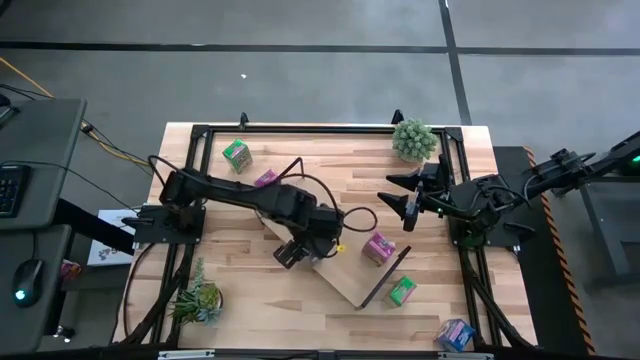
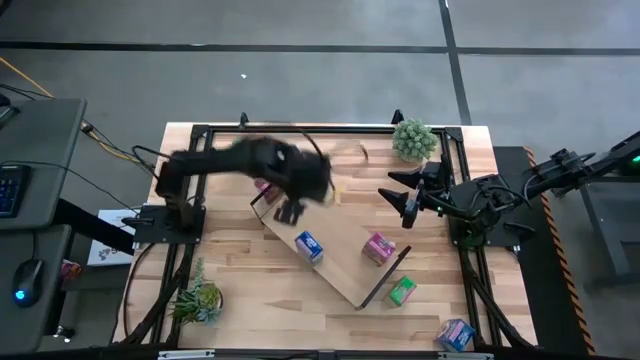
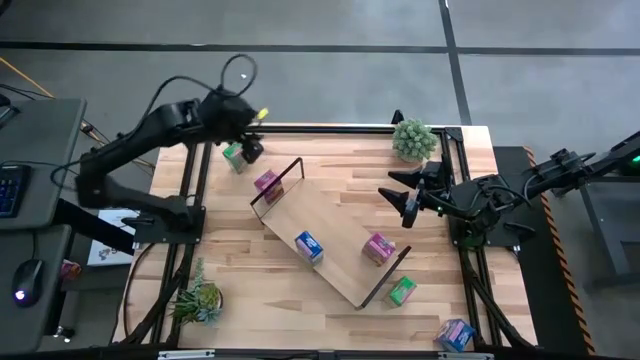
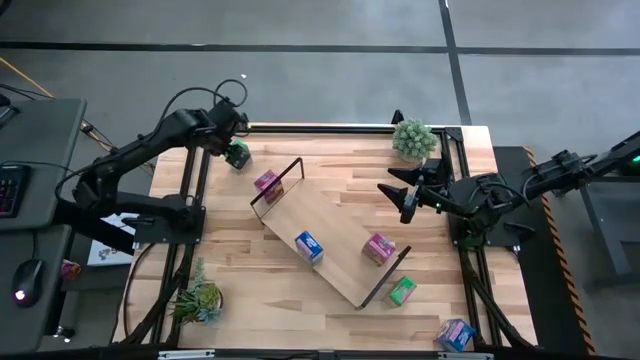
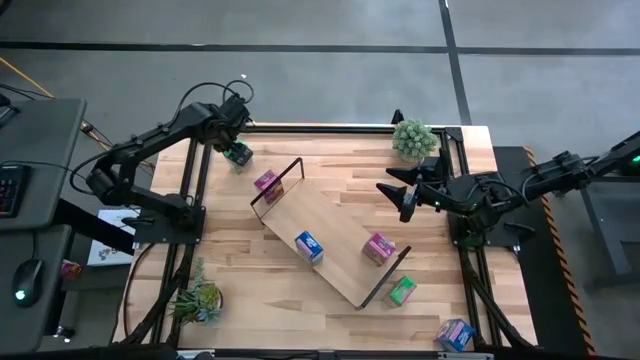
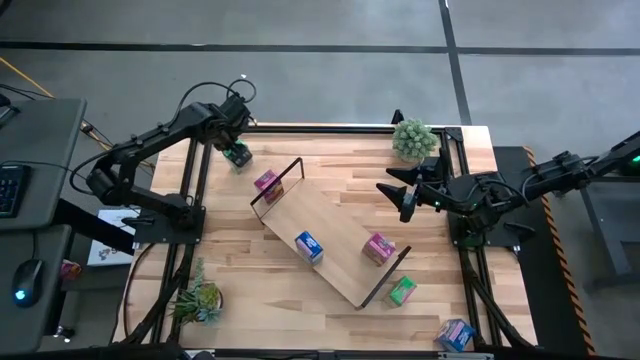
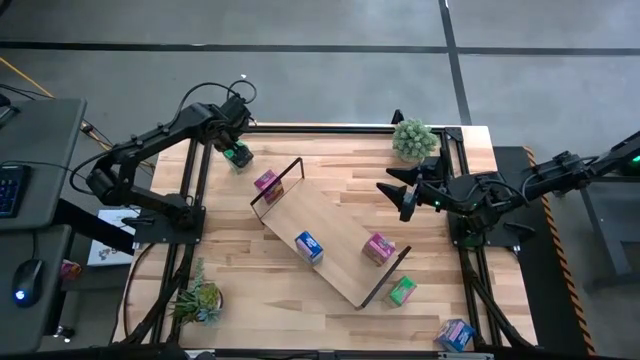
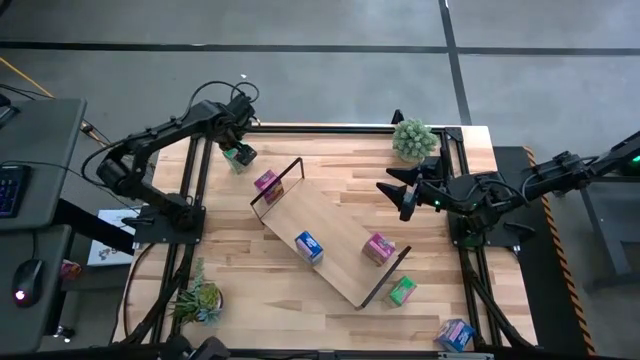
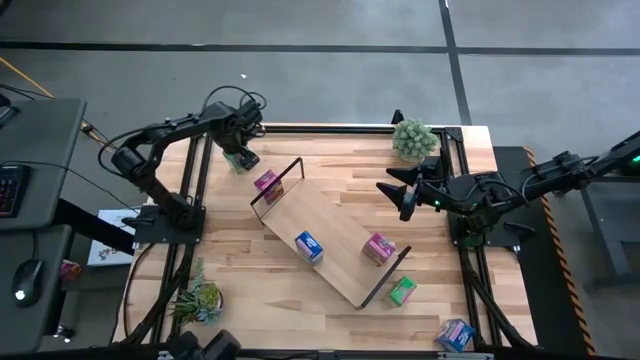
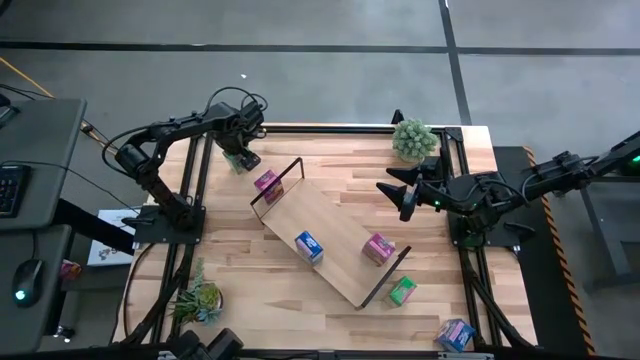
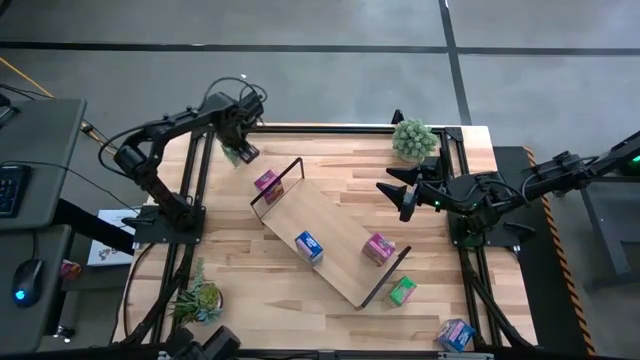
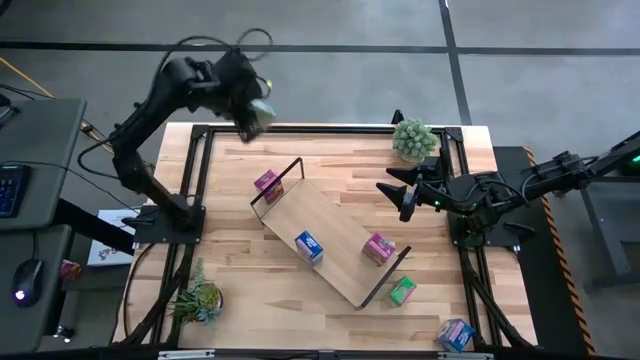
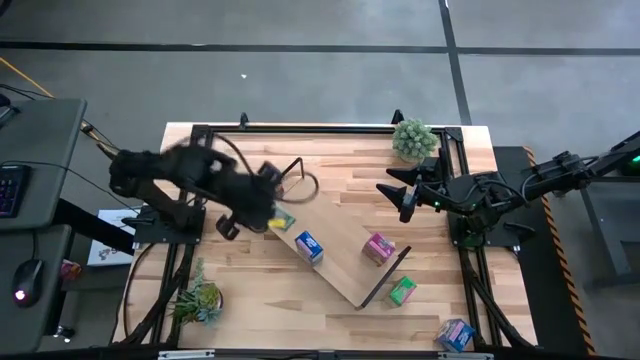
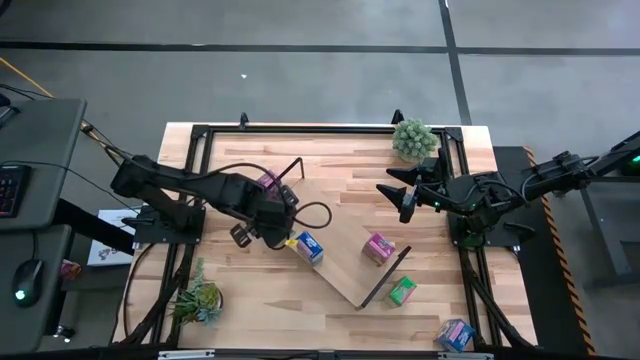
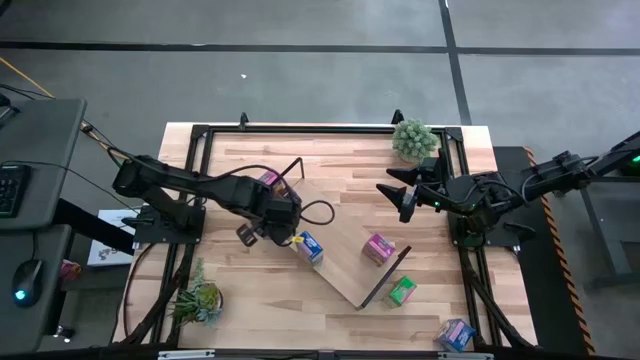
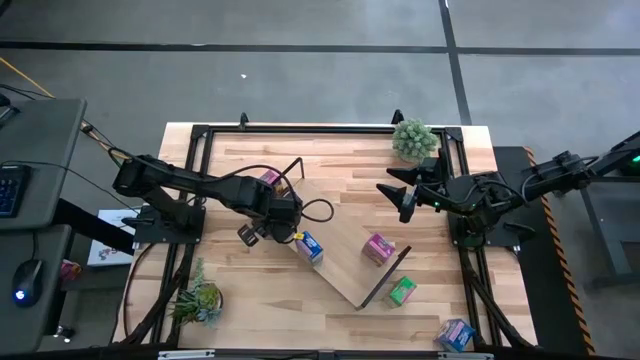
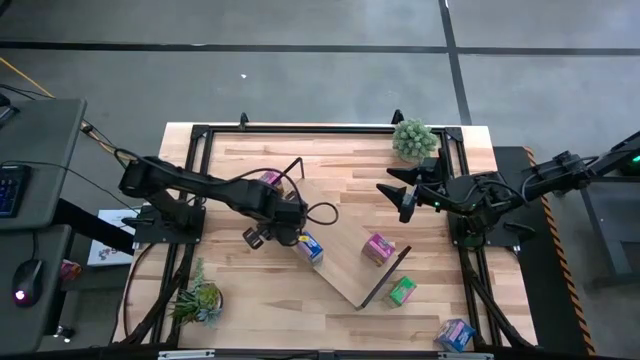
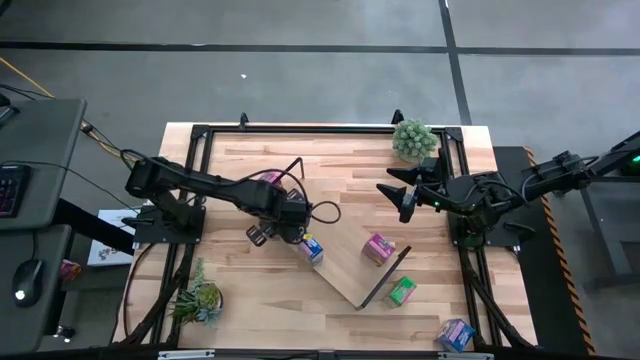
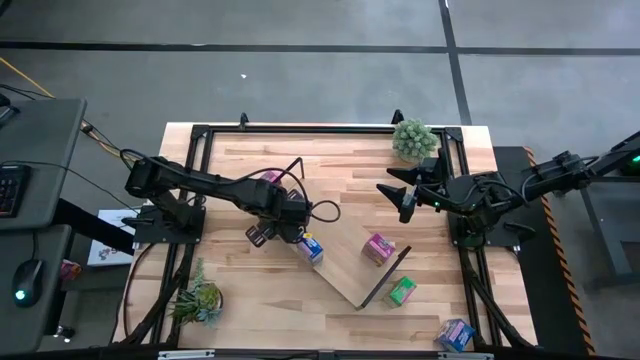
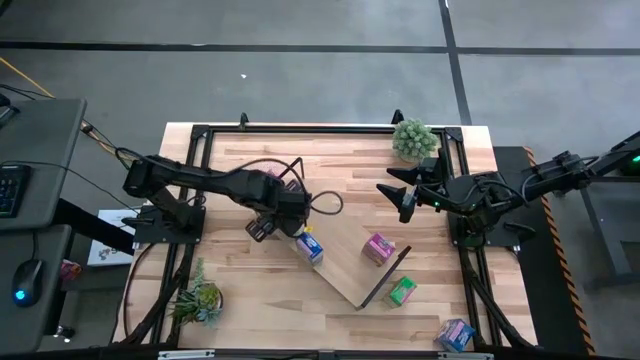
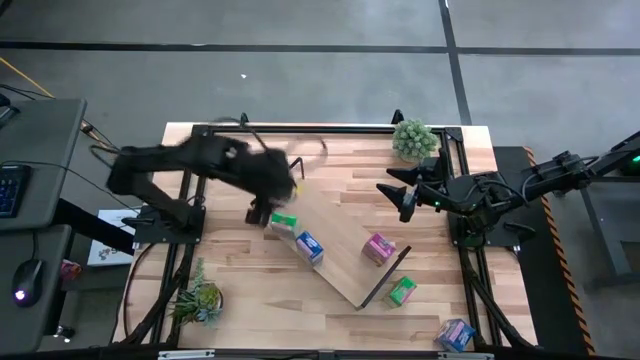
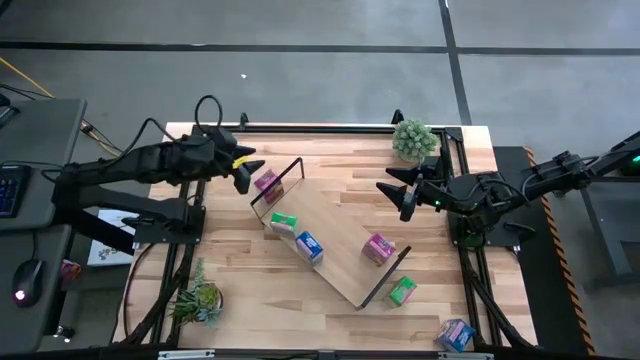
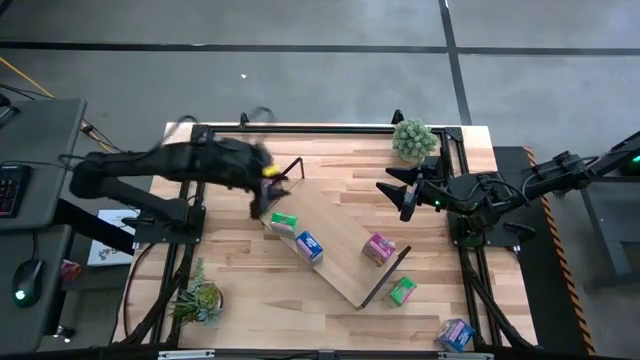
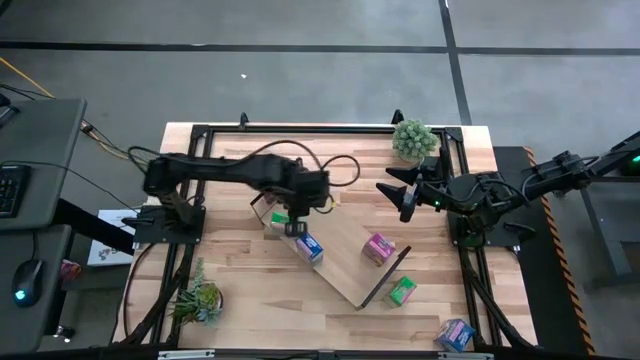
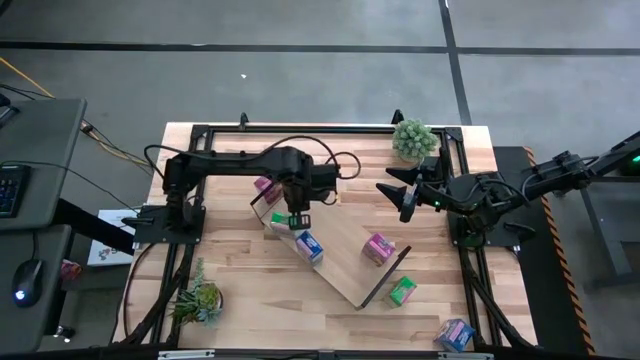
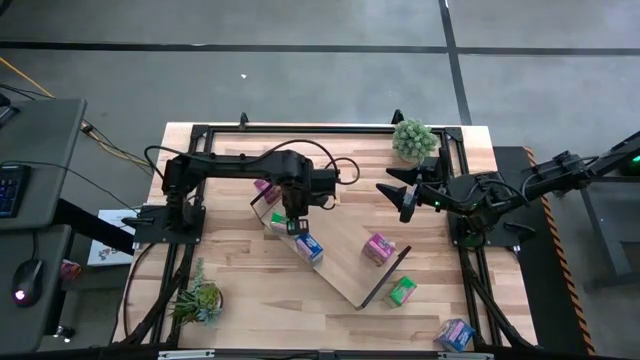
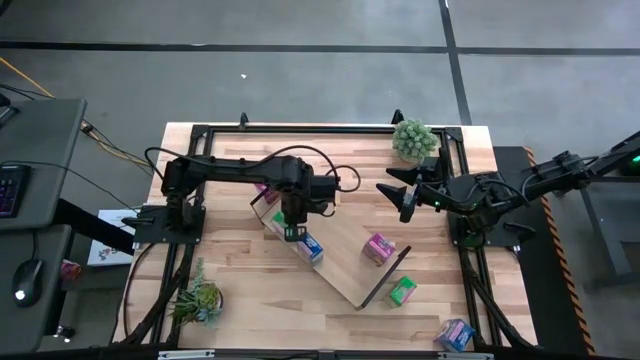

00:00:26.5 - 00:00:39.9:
Task: Stack cereal on shelf
Put the left green cereal box on the shelf

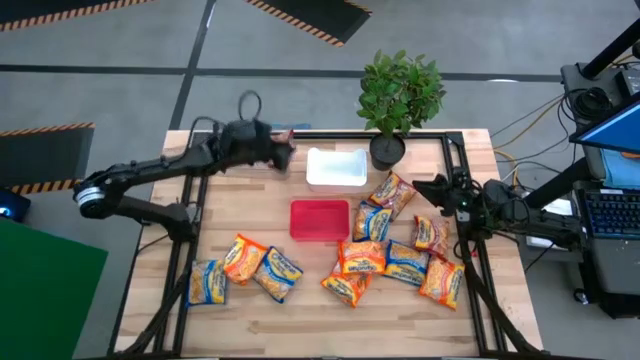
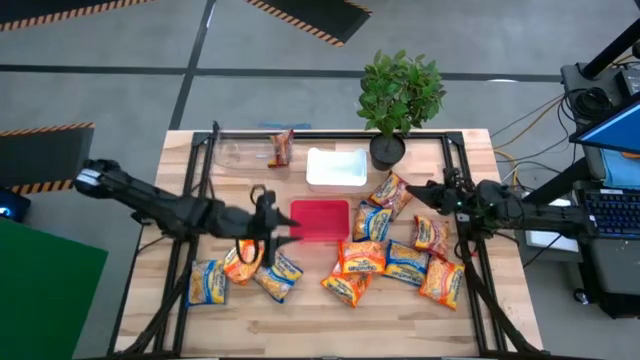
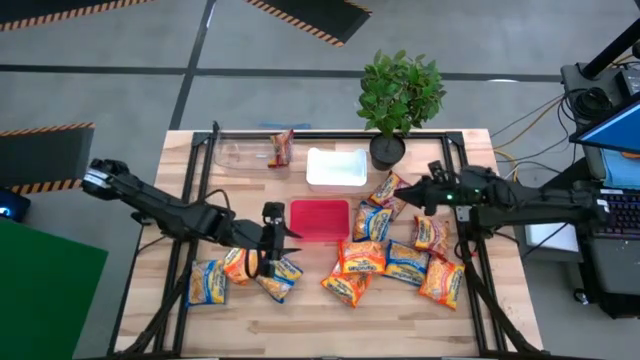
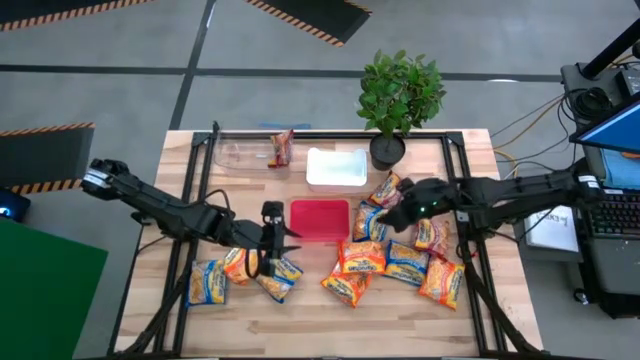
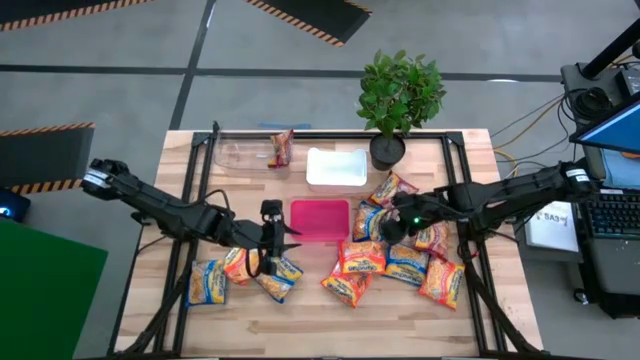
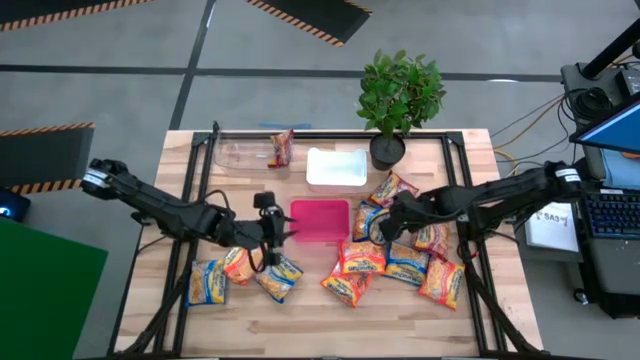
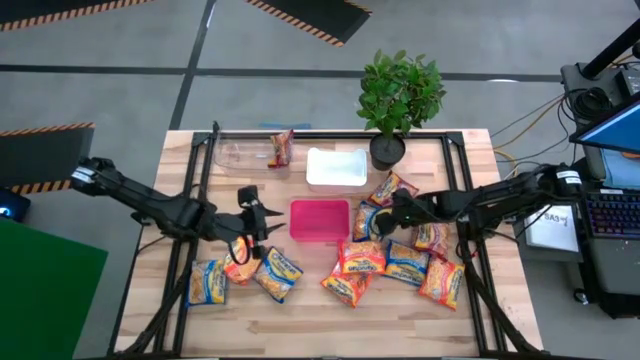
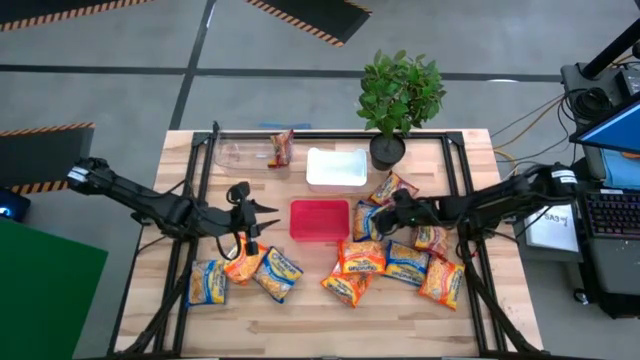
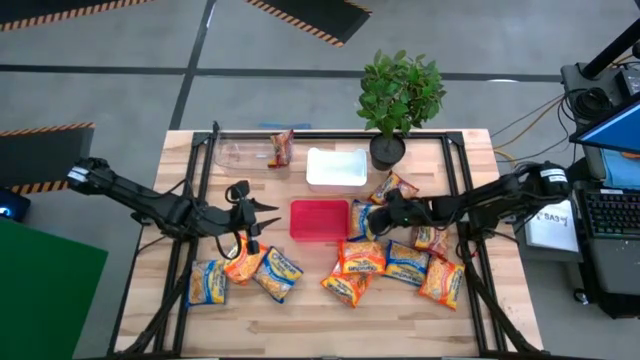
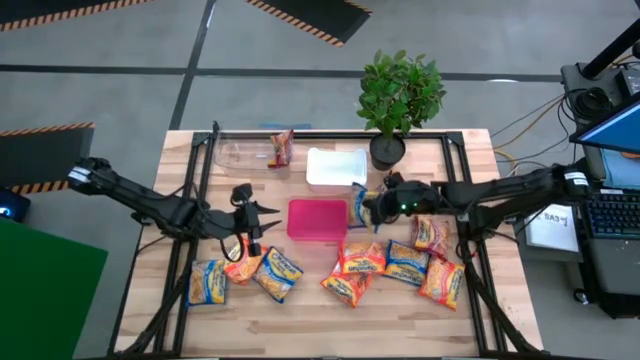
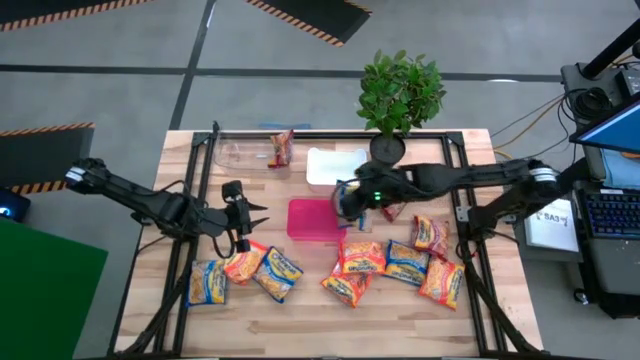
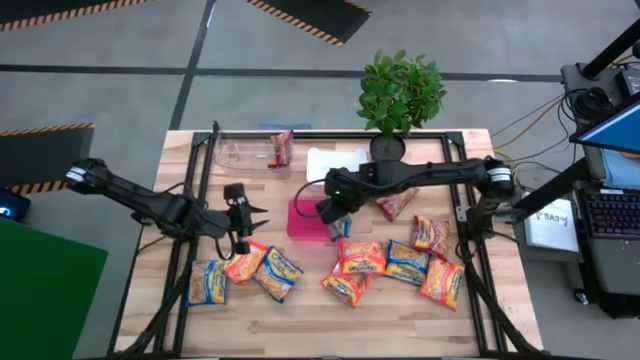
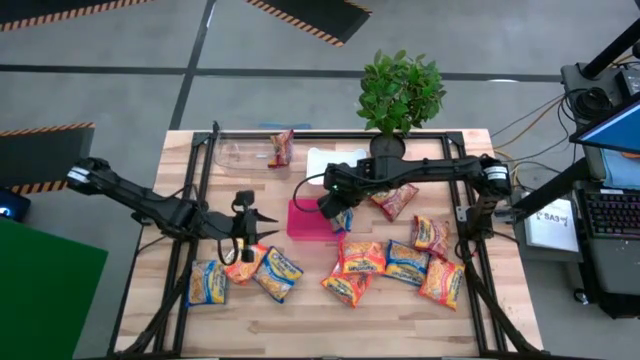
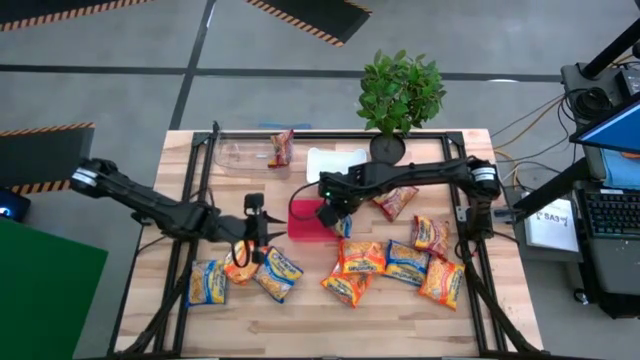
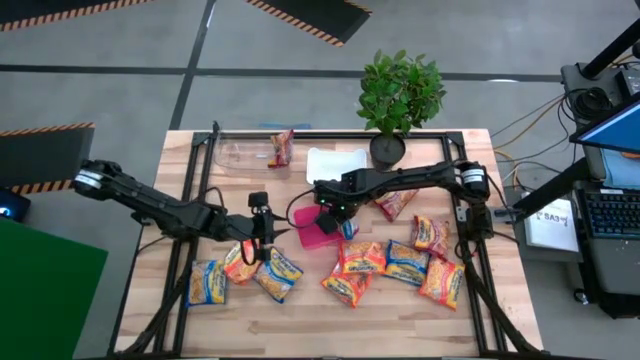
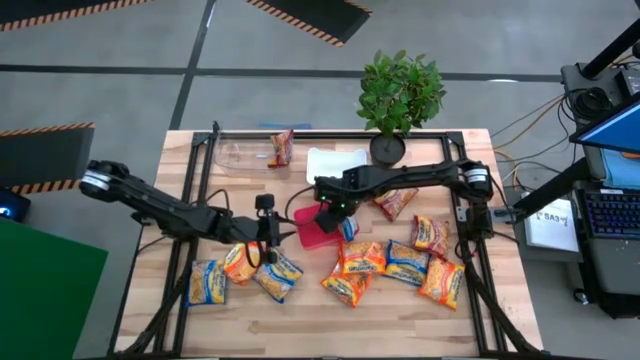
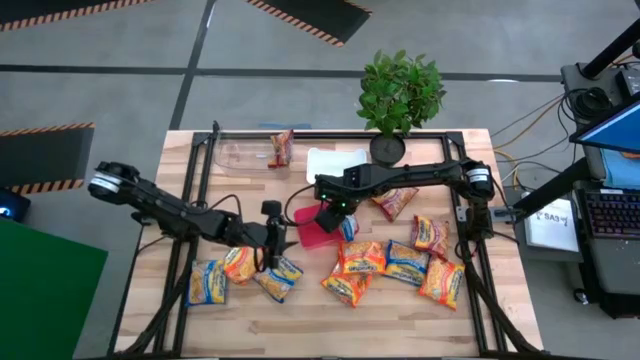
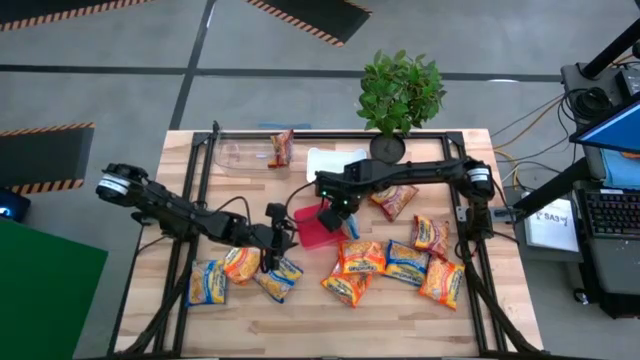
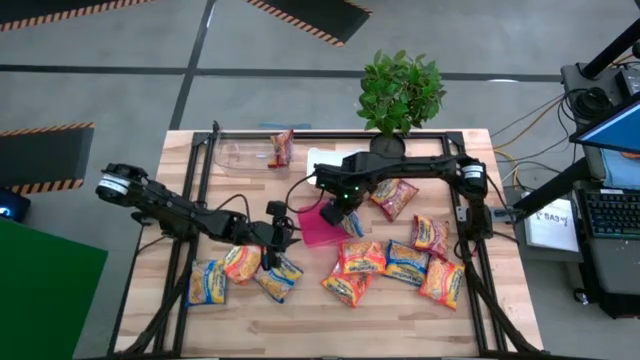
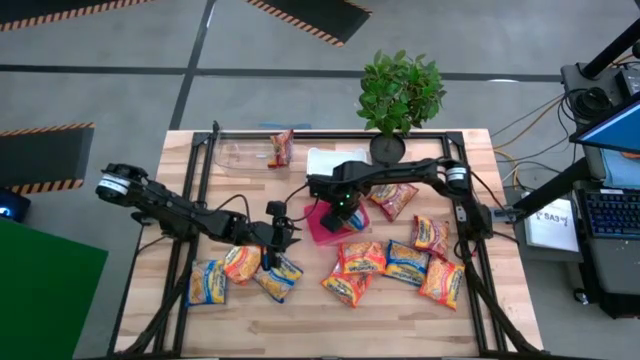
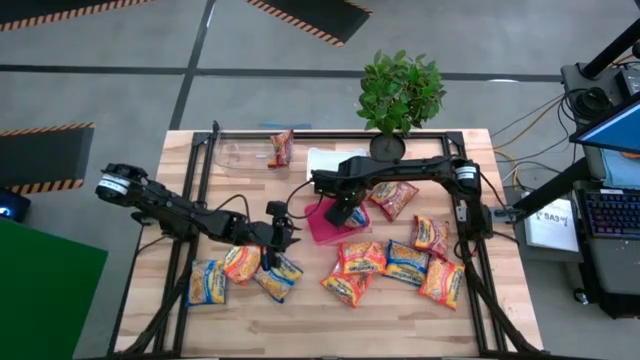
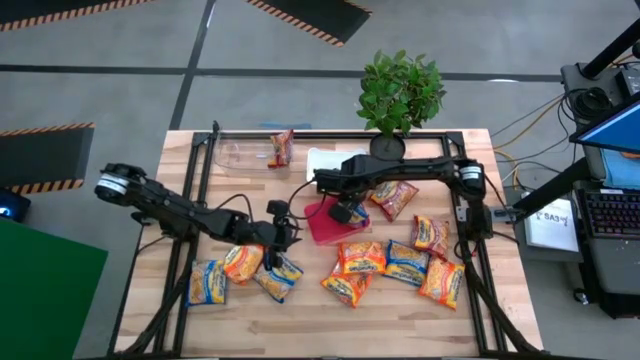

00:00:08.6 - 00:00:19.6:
Task: Sort Maruchan noodles
Put the blue noodle pack into the red bin
